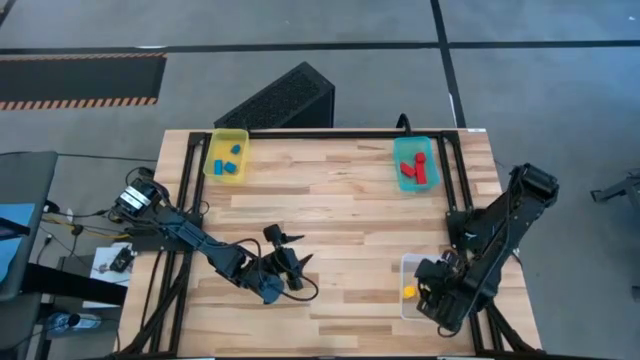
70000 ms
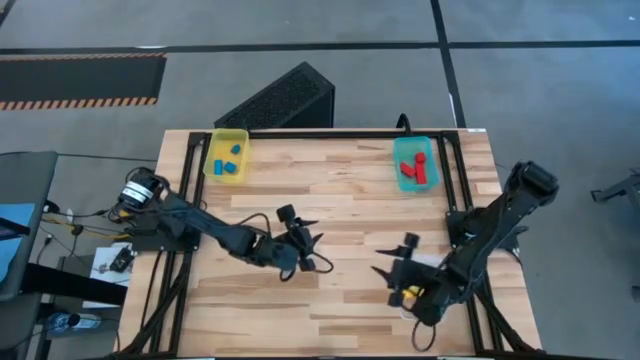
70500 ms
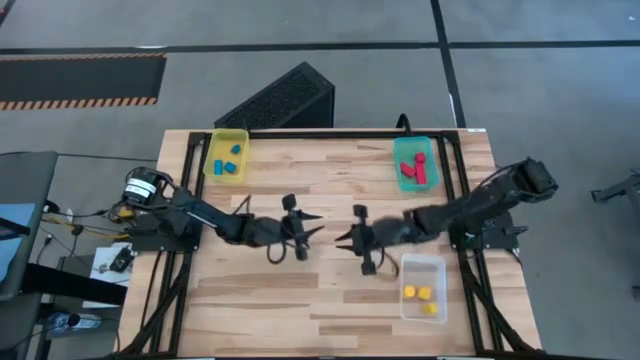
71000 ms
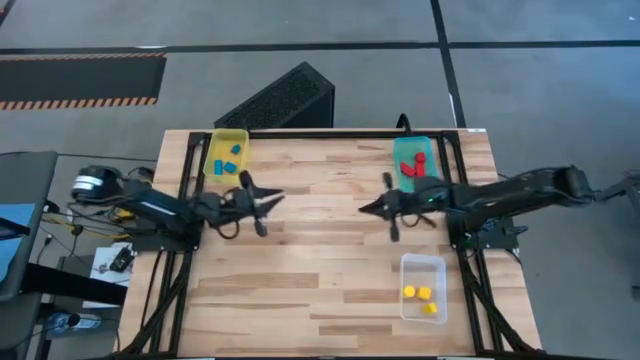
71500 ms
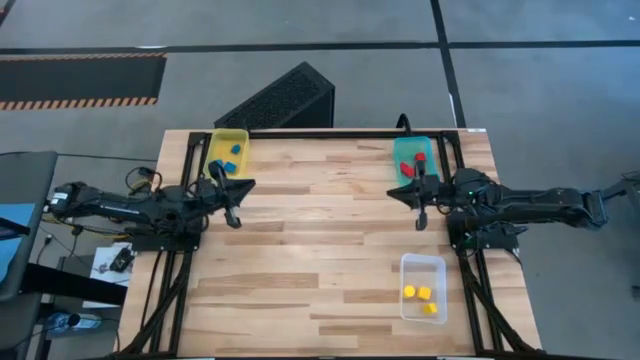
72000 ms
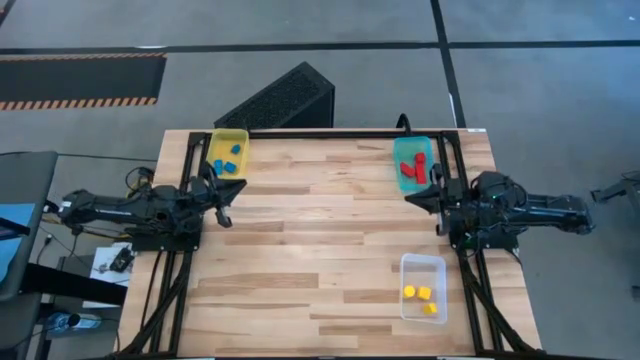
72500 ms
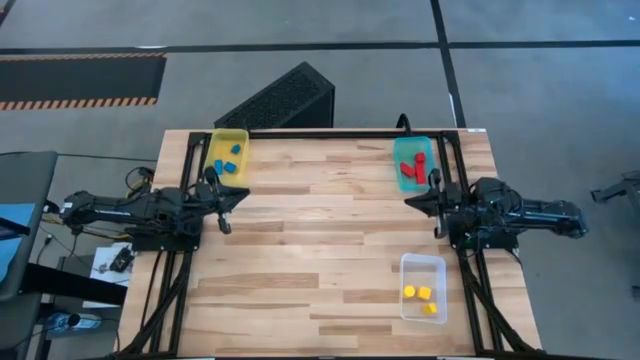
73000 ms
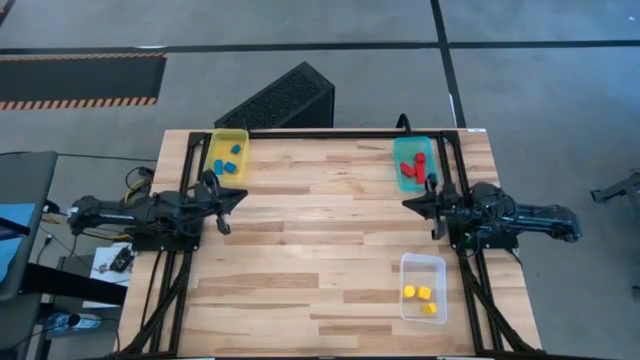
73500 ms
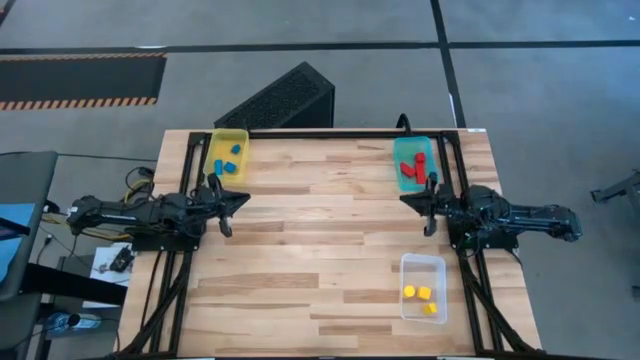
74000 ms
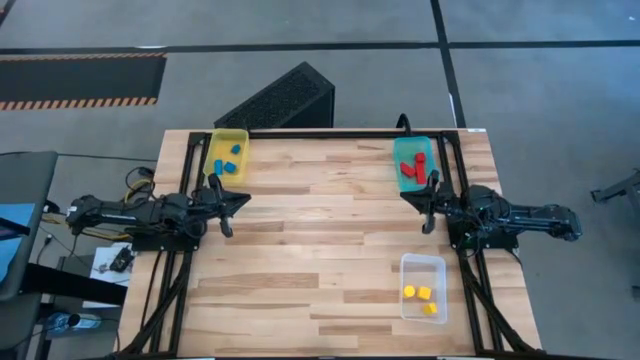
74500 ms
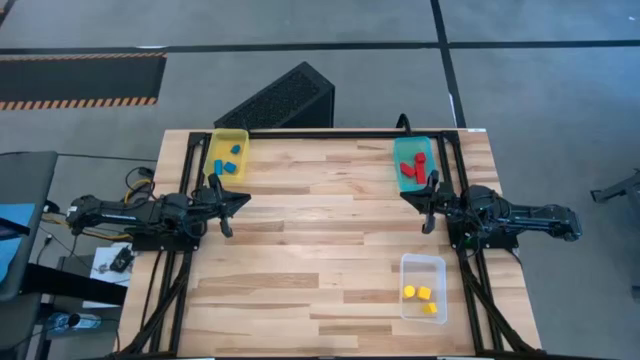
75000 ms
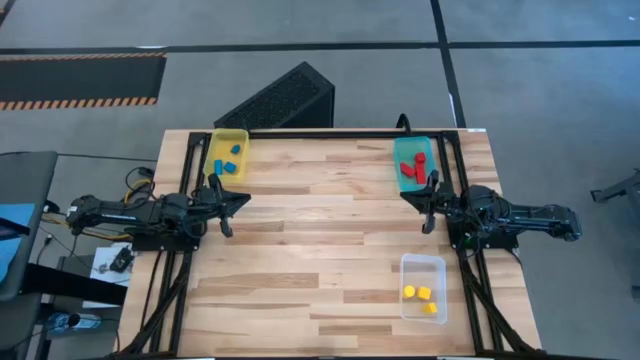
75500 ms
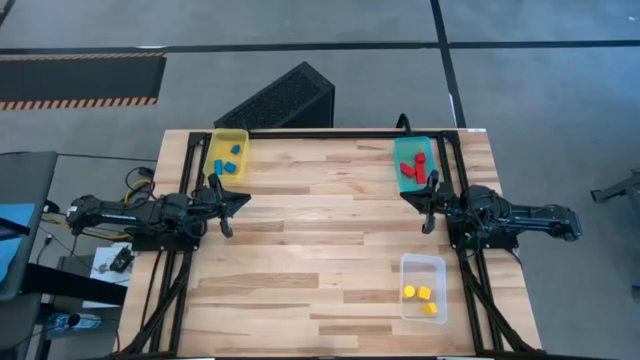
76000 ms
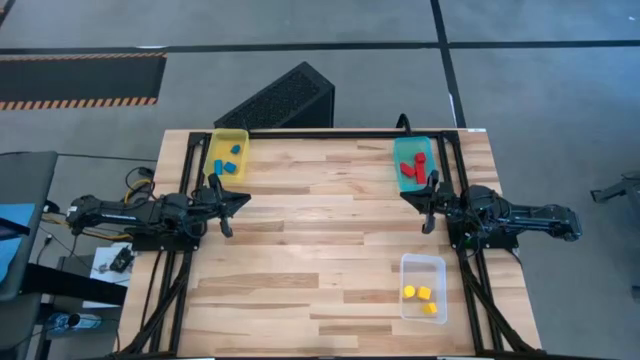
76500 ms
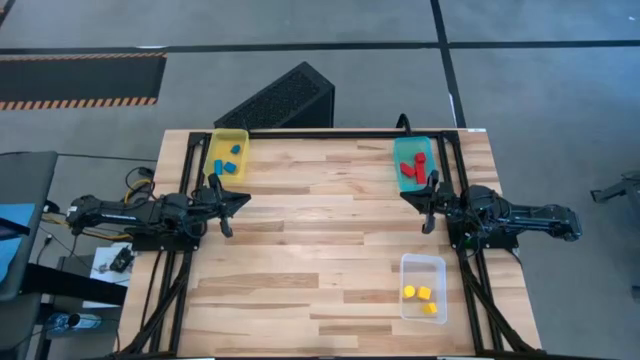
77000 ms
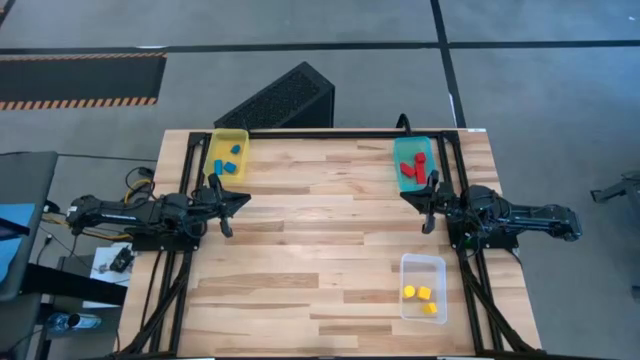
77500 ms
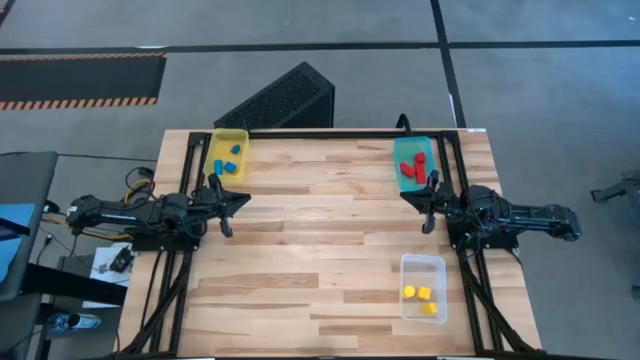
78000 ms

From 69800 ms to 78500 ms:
Task: Sort & place blocks by color
Return to Home Position

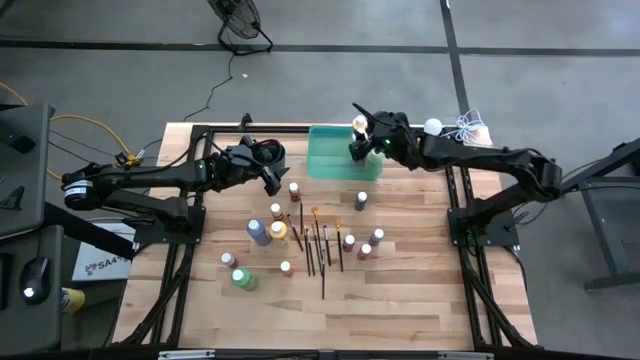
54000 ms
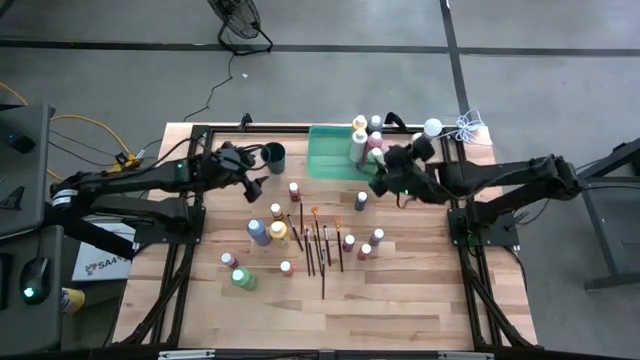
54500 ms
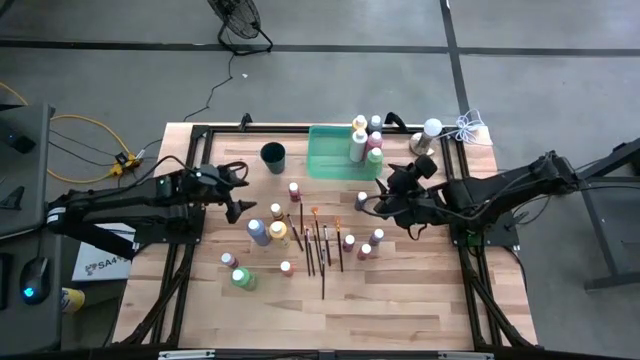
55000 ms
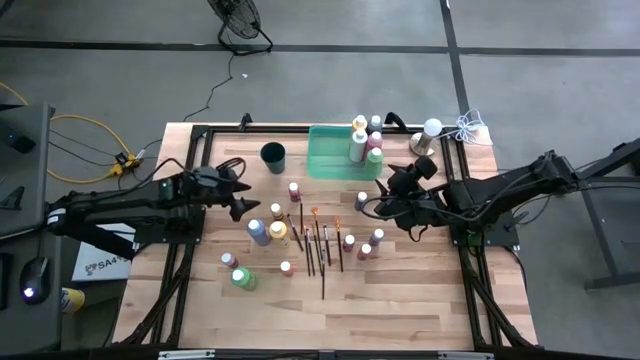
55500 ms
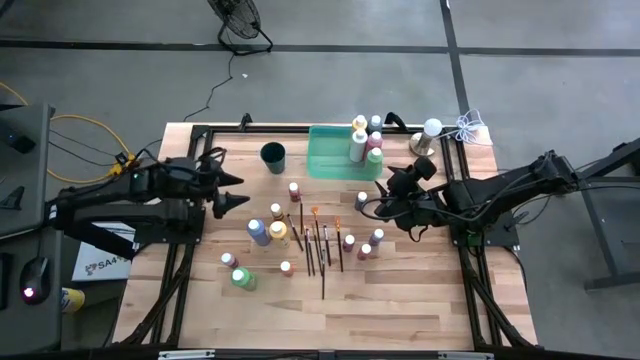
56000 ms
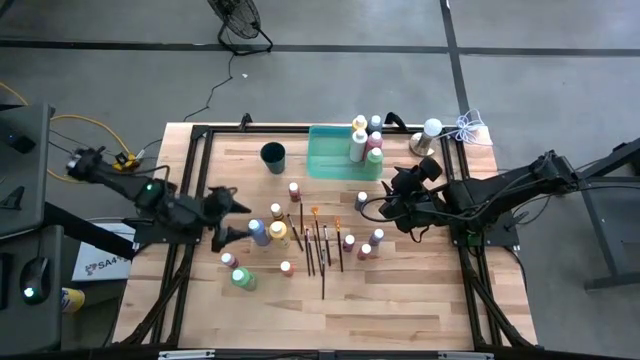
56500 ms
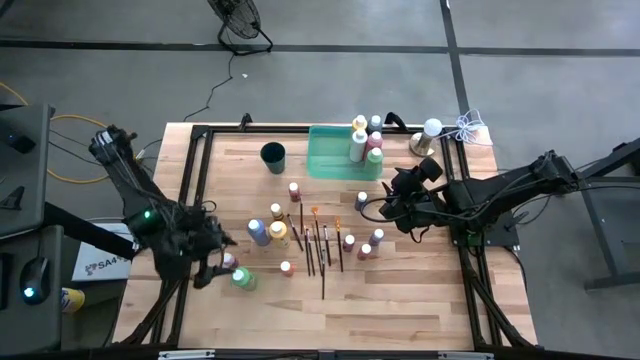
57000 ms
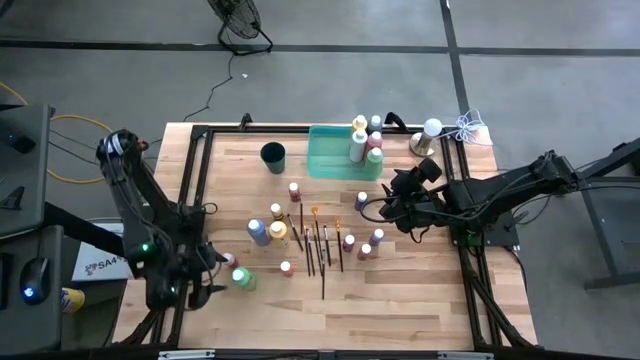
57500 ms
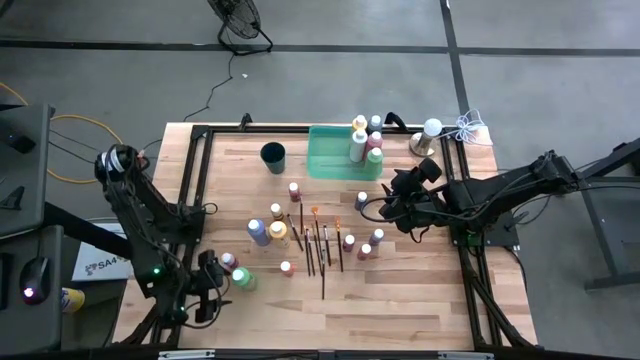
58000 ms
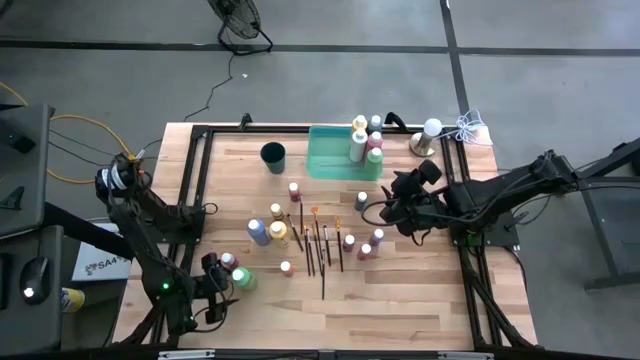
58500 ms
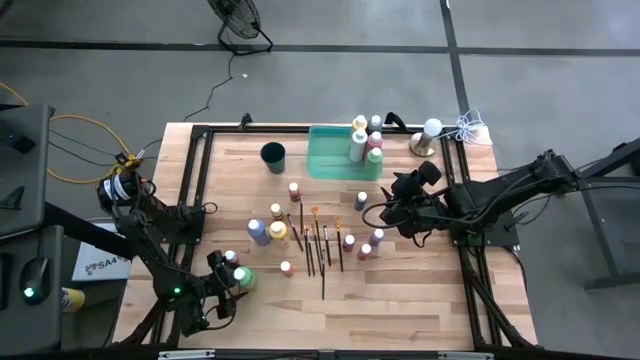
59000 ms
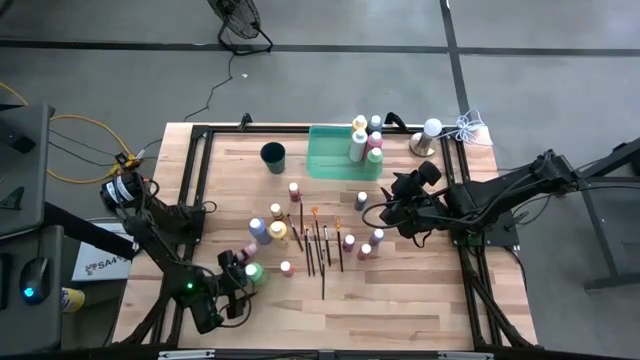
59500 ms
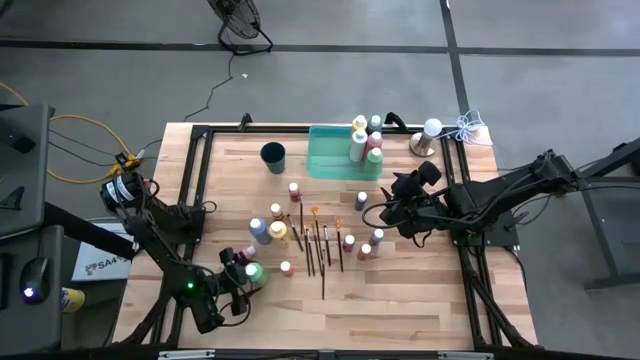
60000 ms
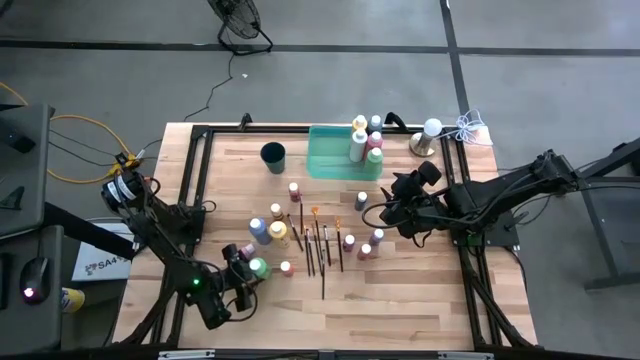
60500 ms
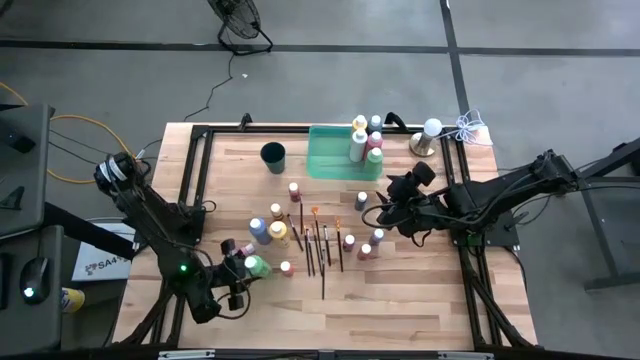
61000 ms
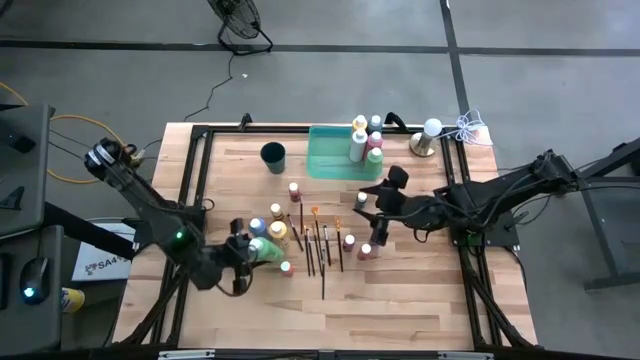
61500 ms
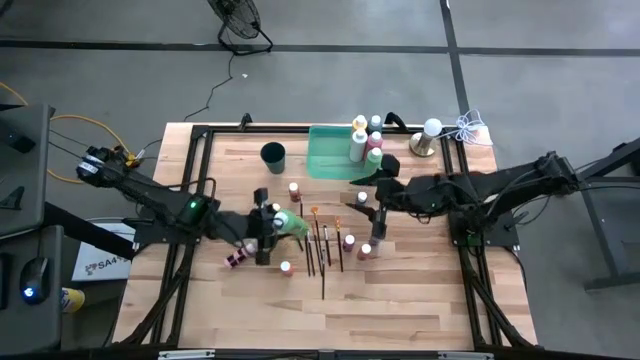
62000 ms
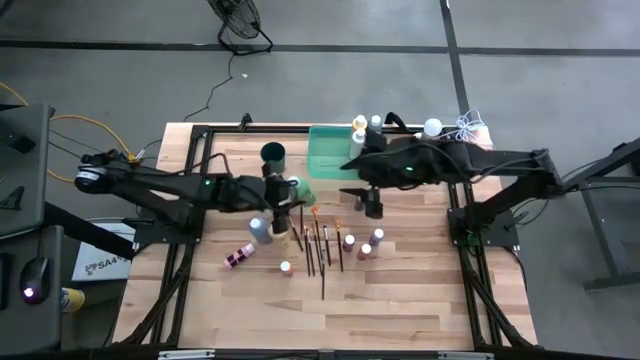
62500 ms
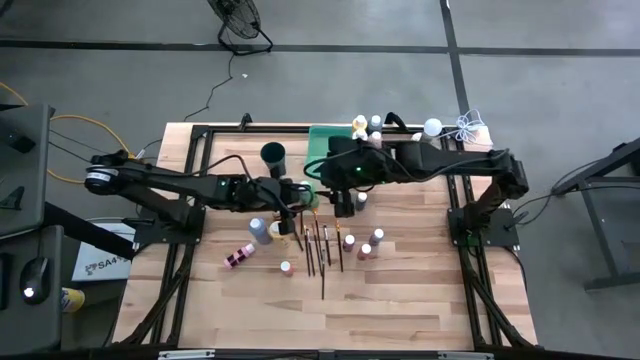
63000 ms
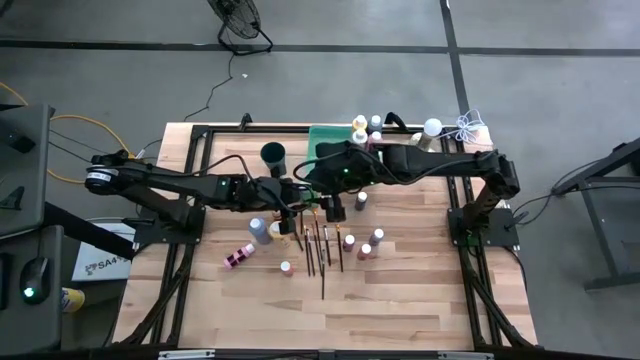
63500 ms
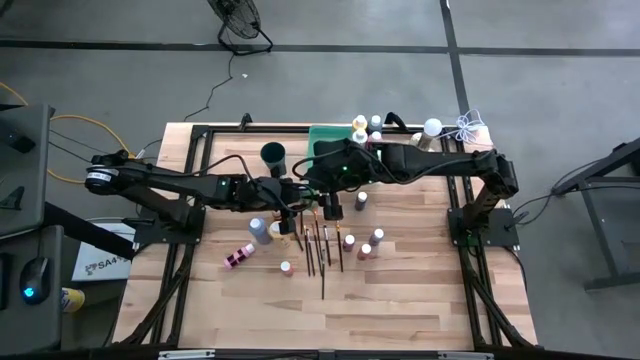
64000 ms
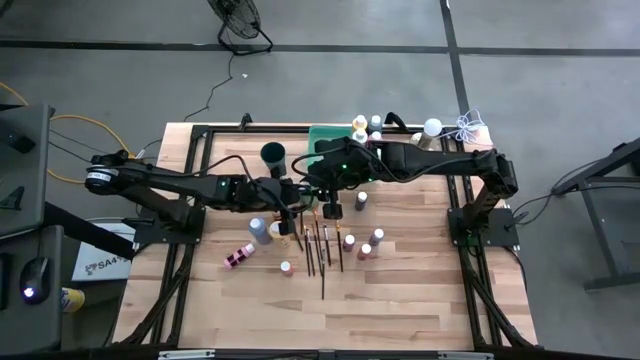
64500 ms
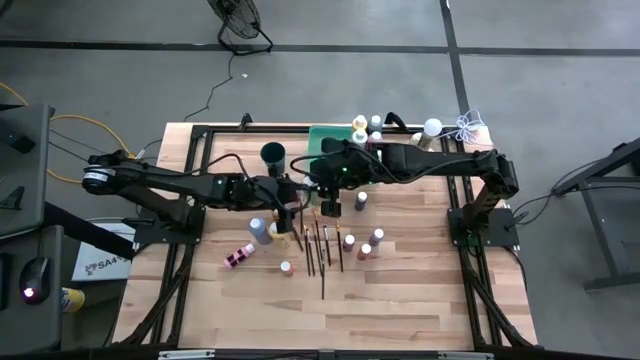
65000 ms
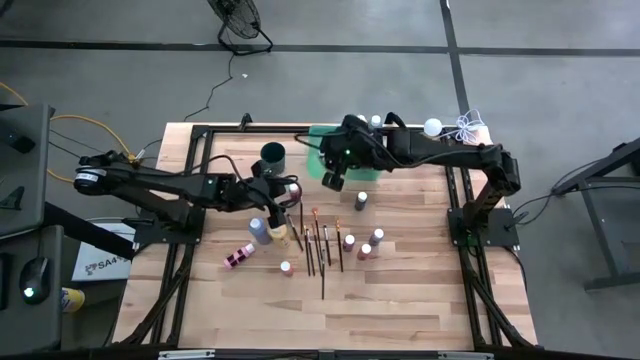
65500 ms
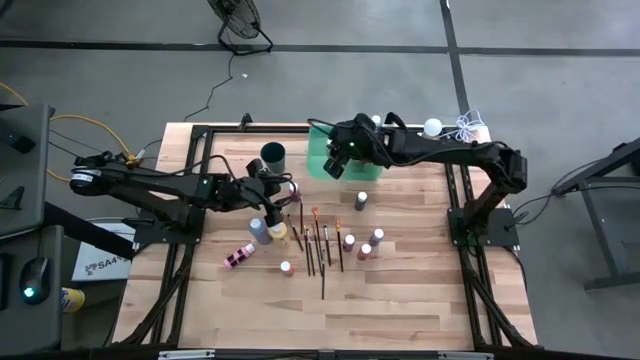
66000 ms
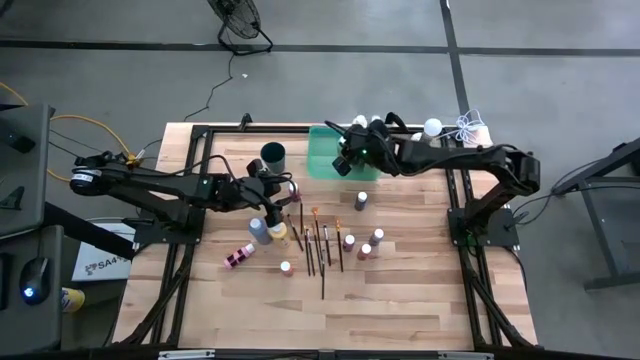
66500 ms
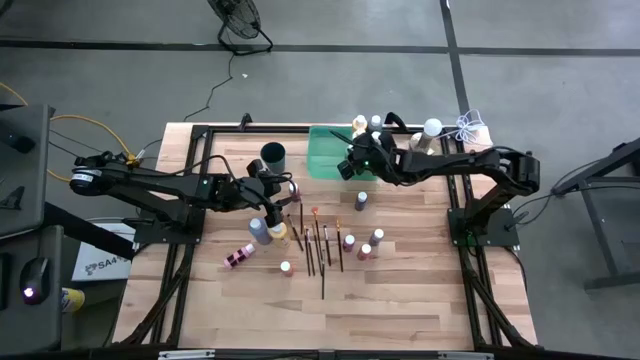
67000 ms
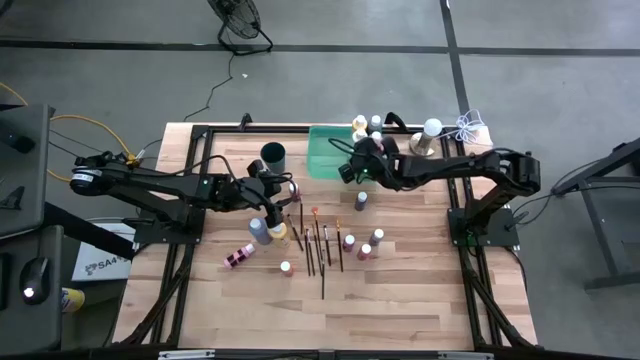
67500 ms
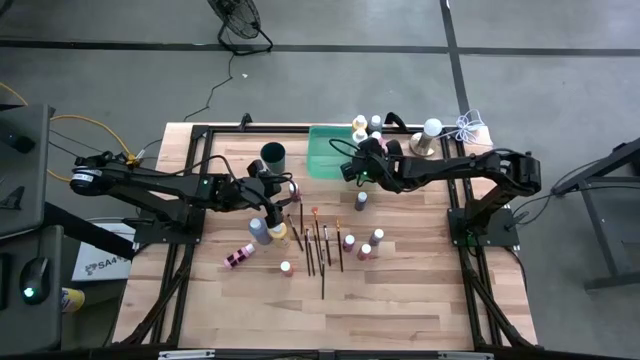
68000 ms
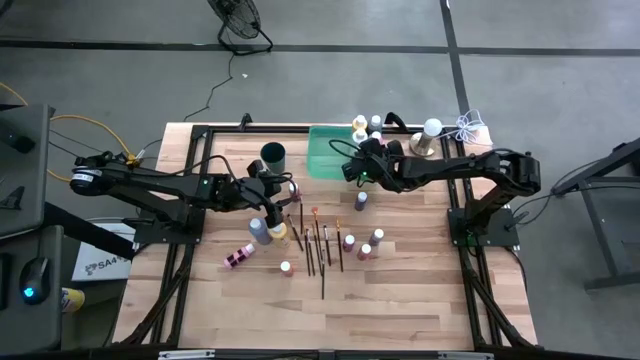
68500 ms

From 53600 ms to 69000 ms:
Task: Pick & Place Paint Supplies
Put the large green paint bottle into the green bin
